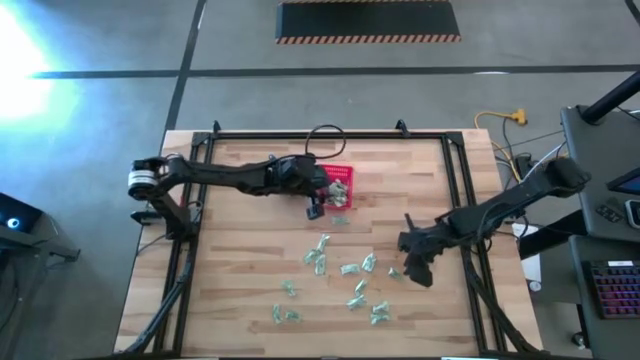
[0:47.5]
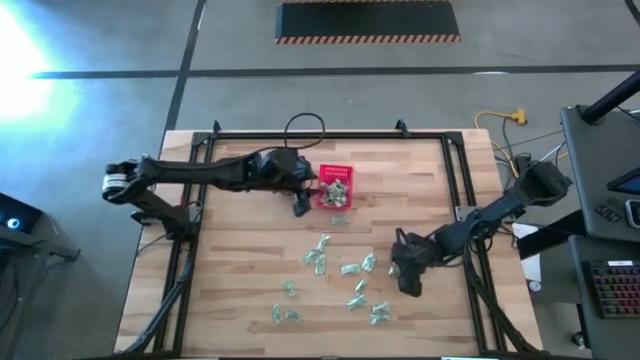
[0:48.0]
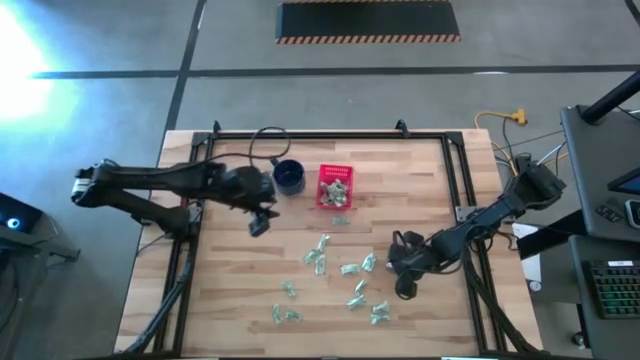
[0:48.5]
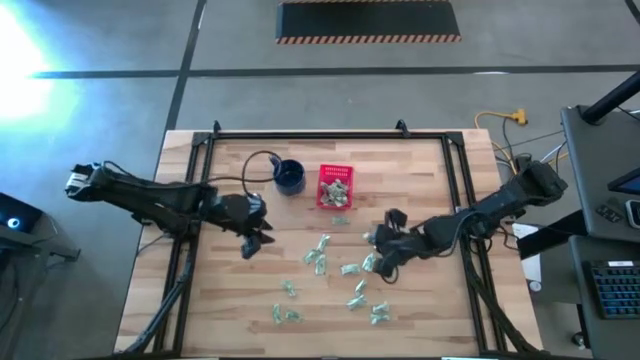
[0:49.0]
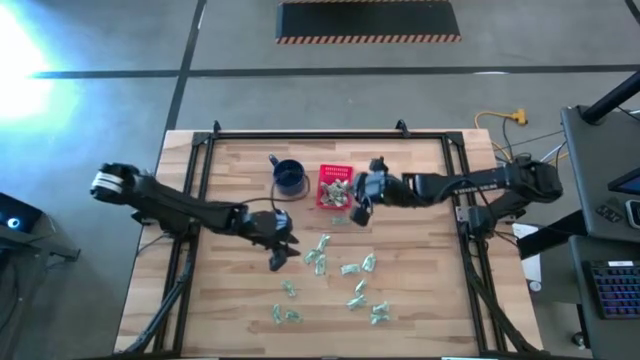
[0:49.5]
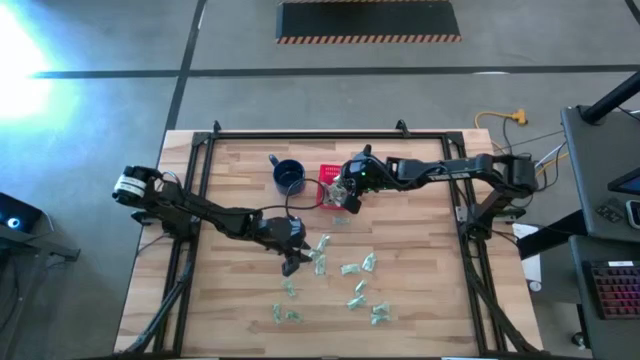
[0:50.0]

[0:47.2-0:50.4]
Task: Pick and place Stevia / Truvia into bins
Put the stevia packet into the basket

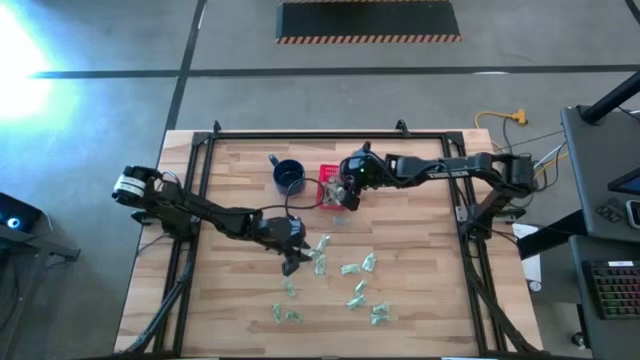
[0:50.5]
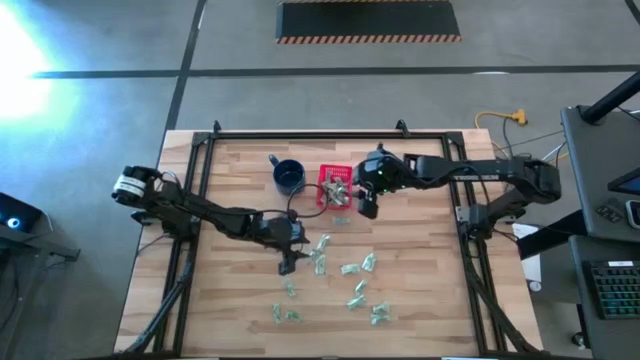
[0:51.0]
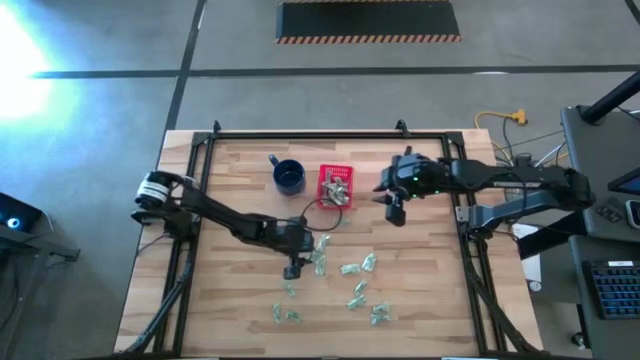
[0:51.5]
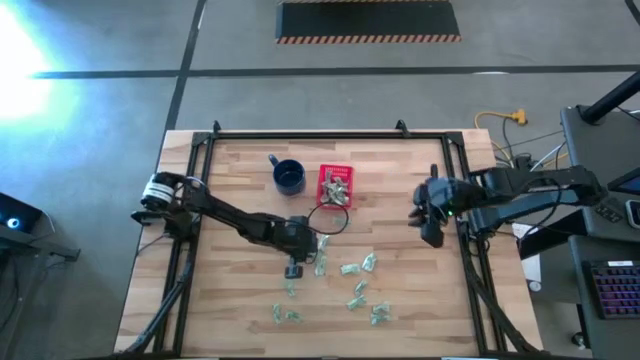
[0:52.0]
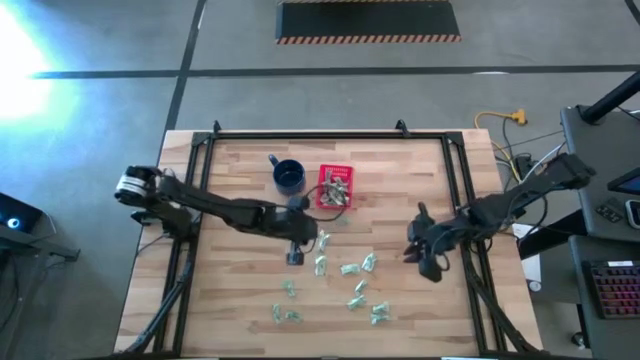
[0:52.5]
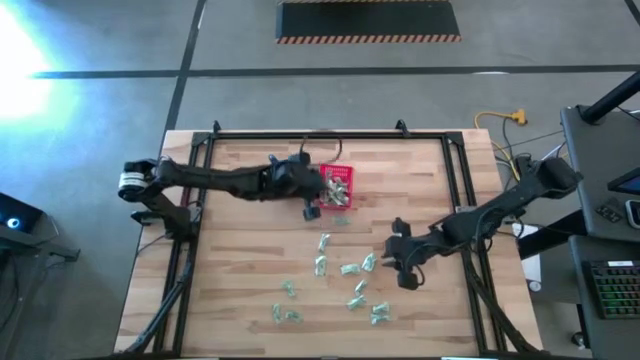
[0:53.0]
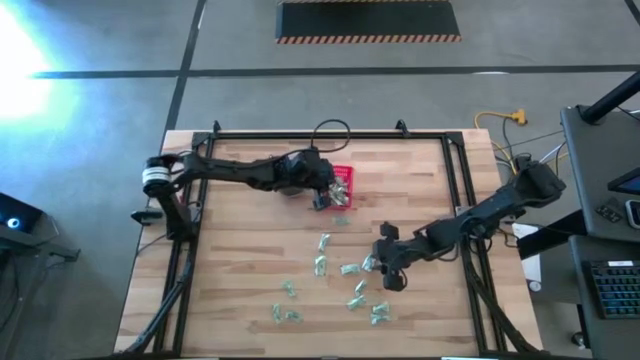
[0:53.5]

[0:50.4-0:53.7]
Put the stevia packet into the basket

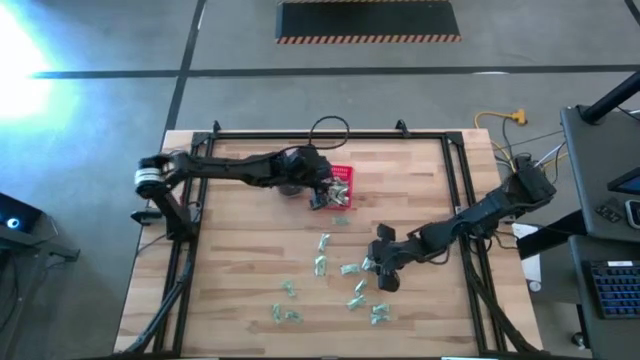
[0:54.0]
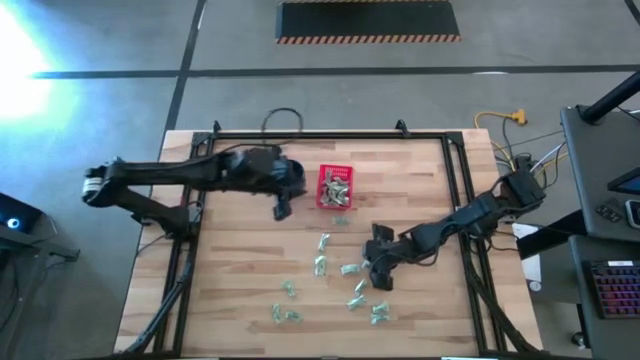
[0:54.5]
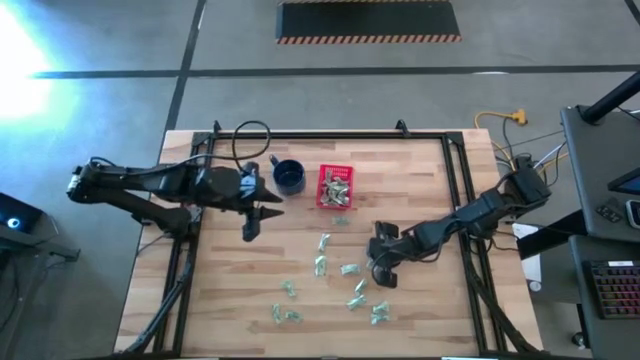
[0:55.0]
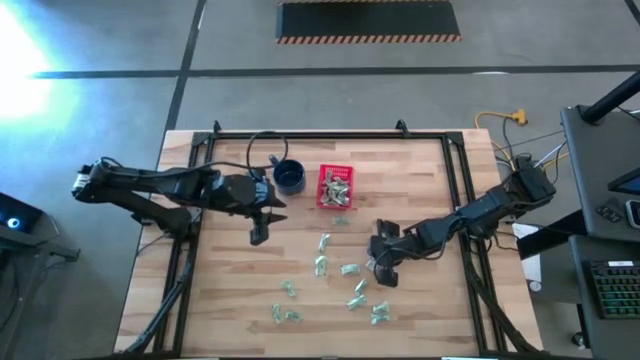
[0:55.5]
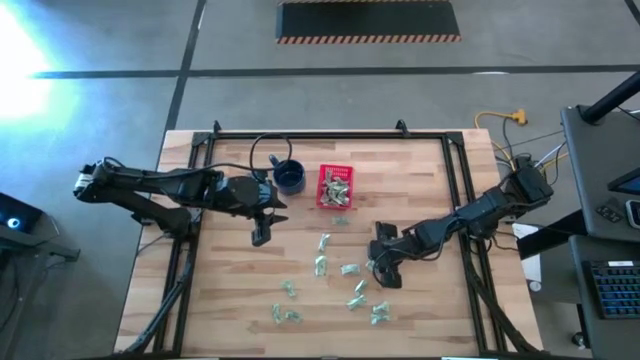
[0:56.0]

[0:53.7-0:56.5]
Put the stevia packet into the basket

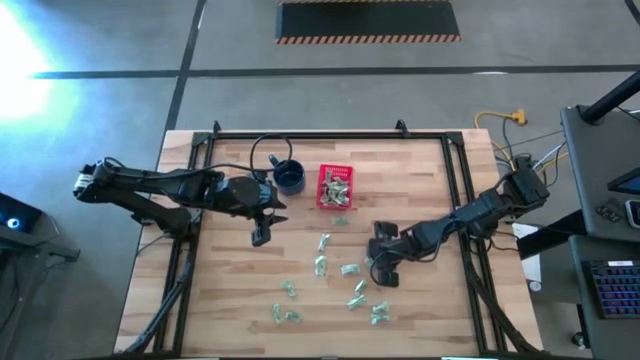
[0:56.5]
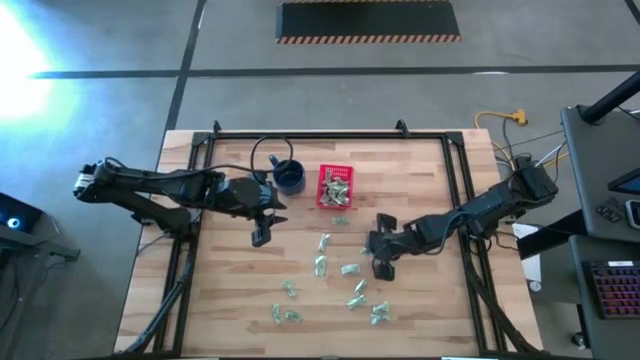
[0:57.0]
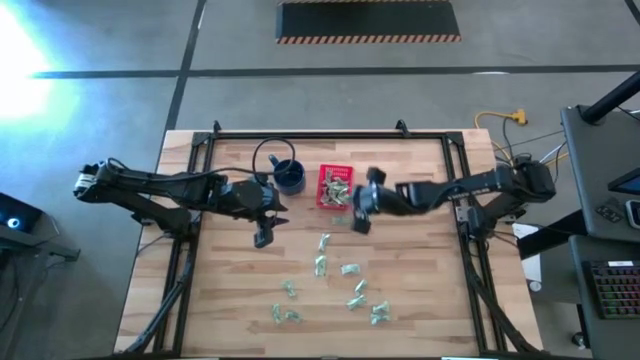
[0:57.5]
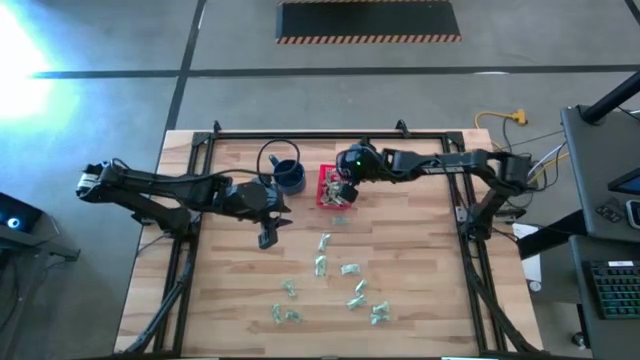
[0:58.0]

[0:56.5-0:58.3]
Put the stevia packet into the basket

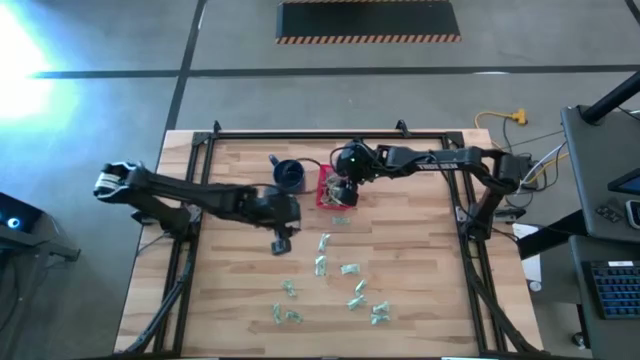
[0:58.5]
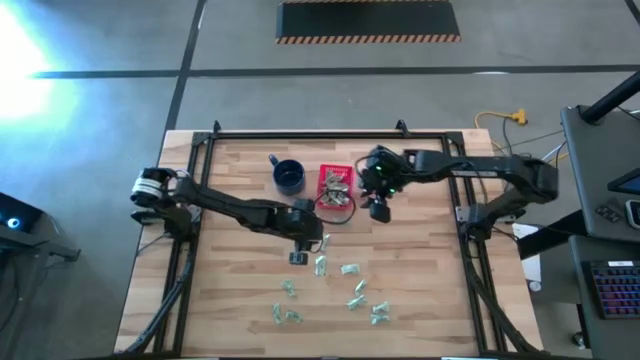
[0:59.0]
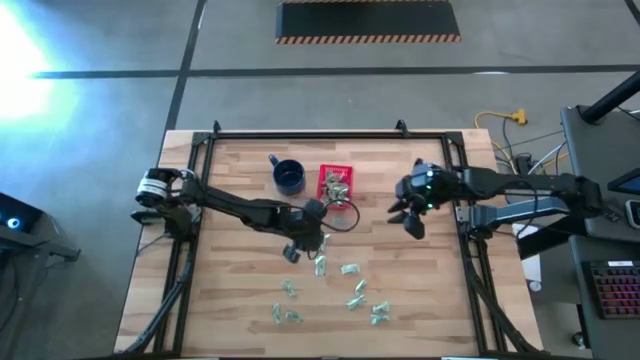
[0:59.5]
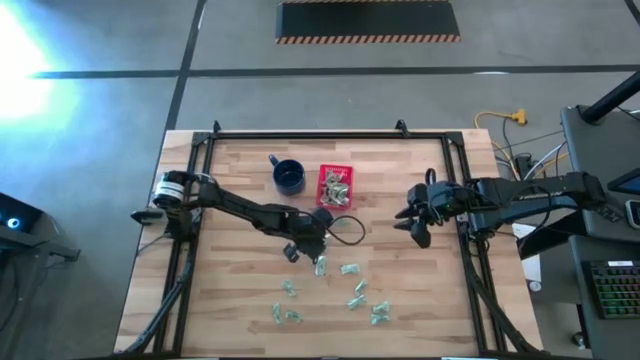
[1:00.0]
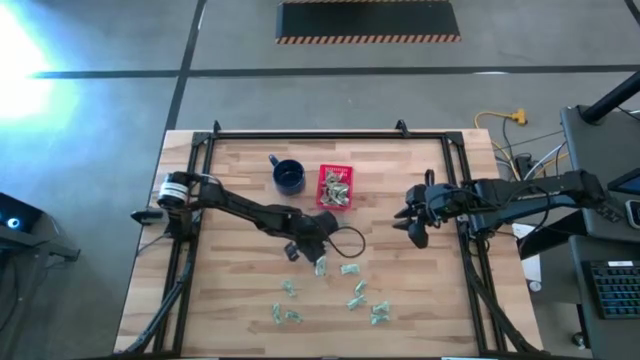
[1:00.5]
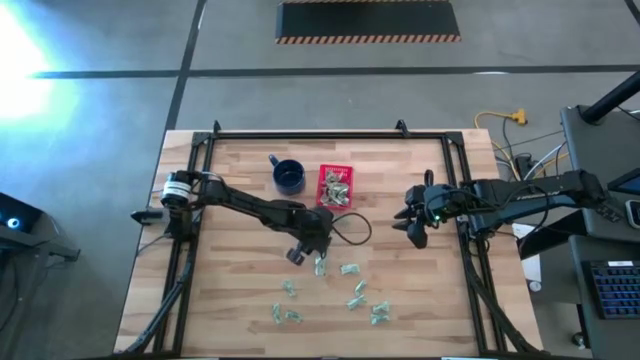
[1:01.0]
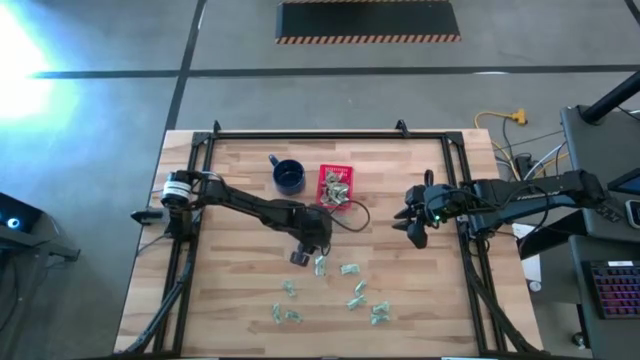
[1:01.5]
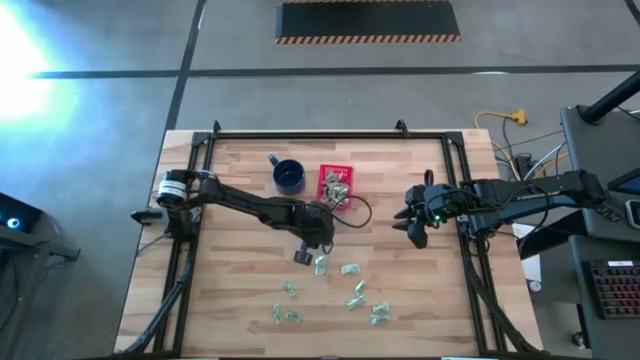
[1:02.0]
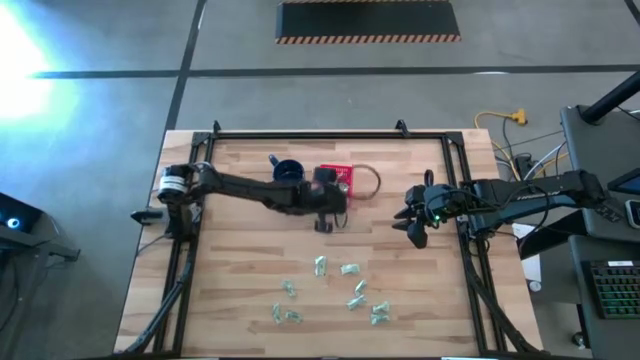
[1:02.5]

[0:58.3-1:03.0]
Put the stevia packet into the basket

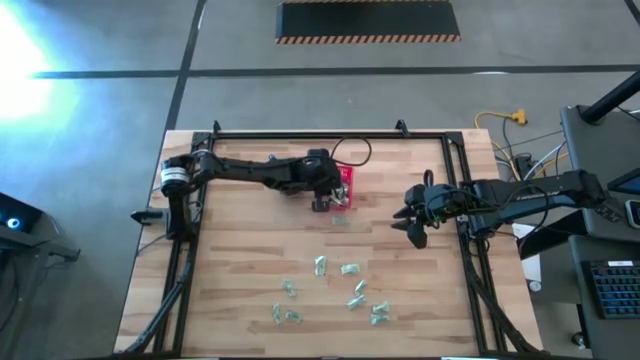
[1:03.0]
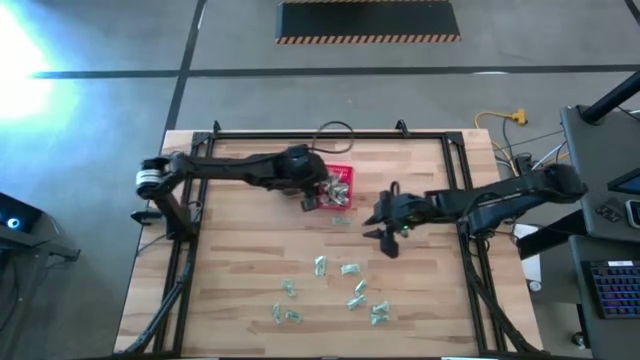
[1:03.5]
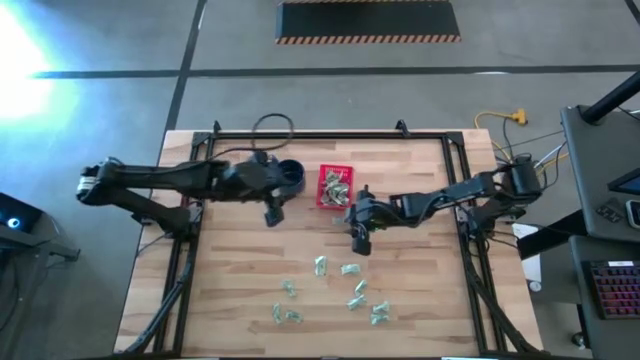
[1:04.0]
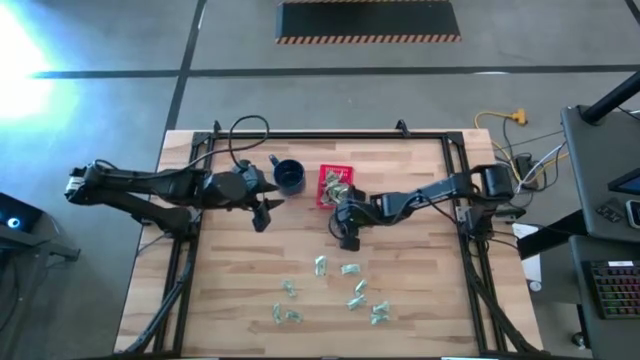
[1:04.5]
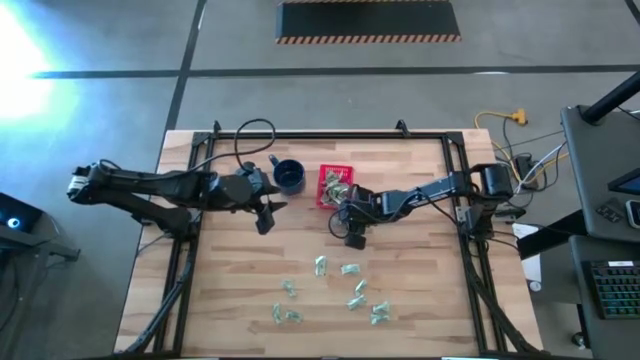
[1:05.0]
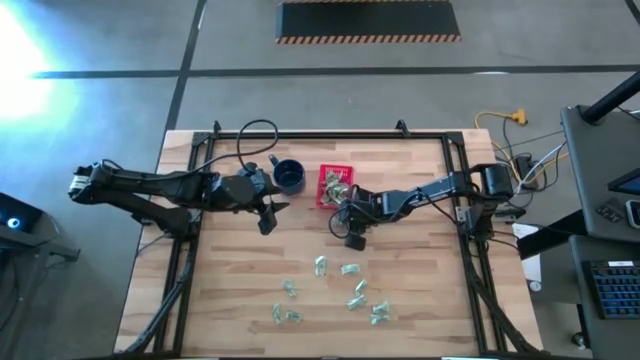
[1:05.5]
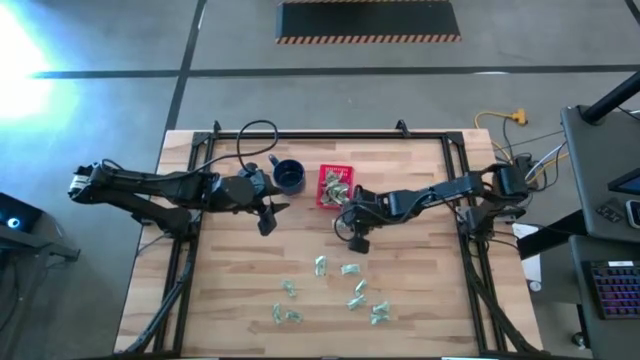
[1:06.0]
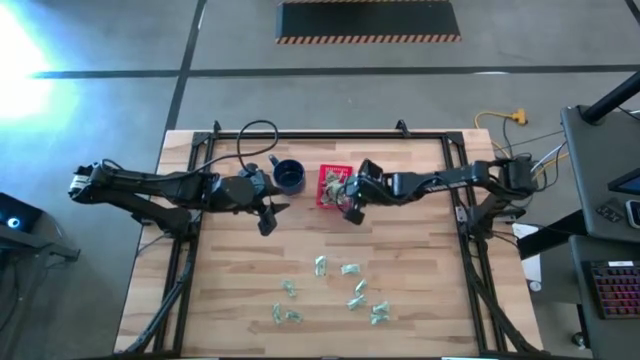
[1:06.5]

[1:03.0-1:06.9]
Put the stevia packet into the basket

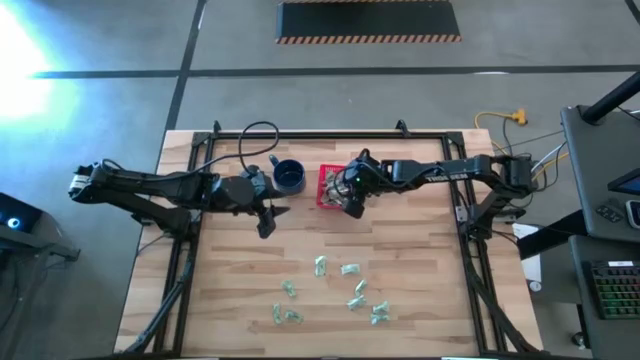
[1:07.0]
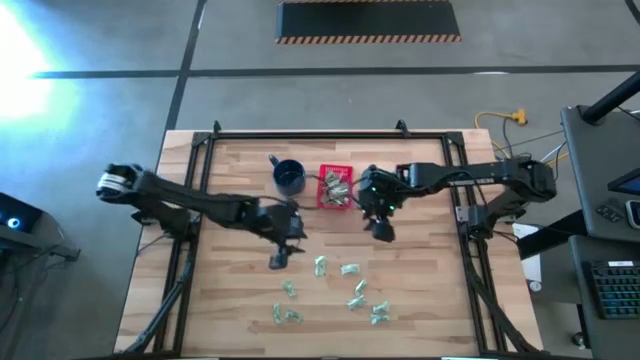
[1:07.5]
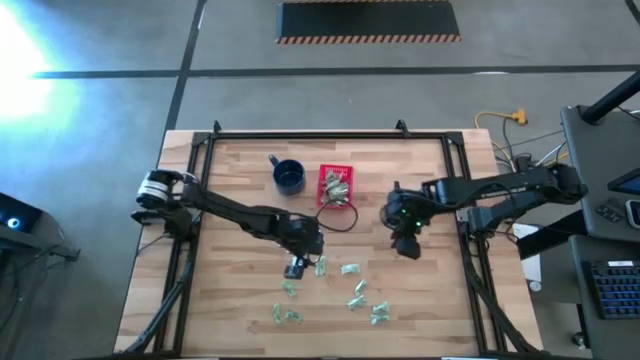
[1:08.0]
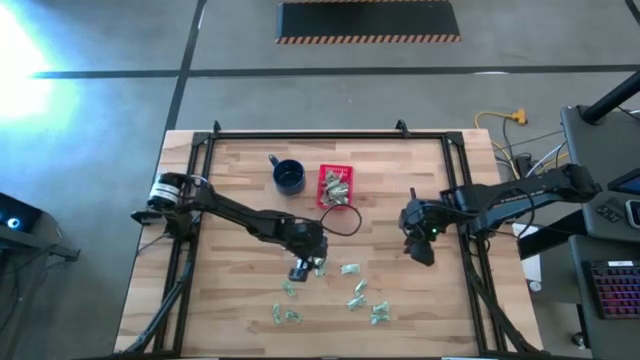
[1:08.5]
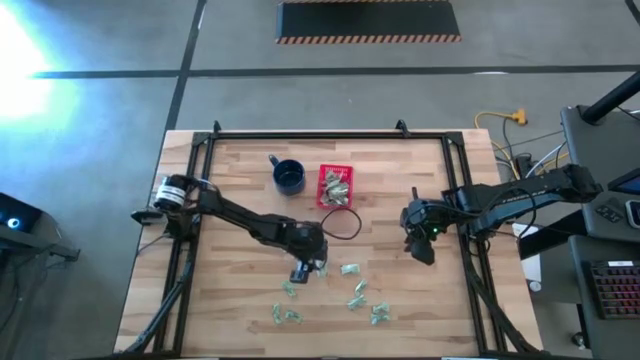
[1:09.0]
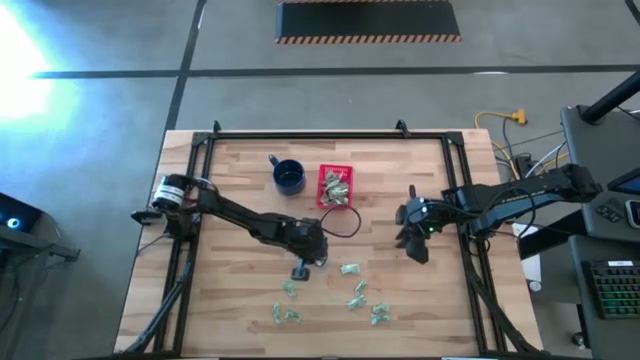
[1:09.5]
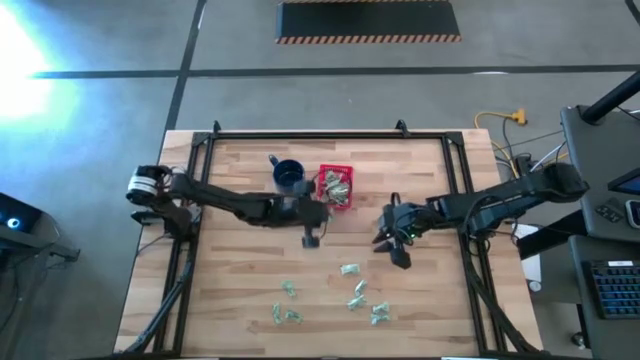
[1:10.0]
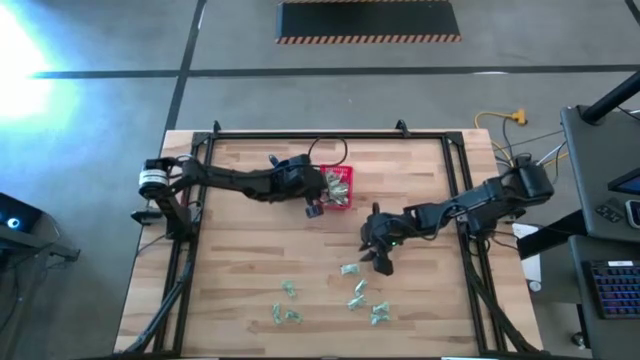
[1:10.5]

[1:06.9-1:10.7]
Put the stevia packet into the basket
